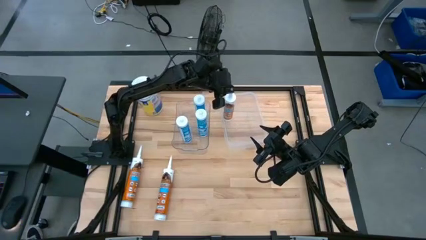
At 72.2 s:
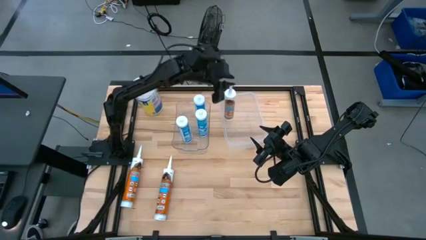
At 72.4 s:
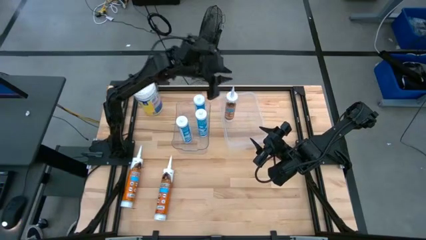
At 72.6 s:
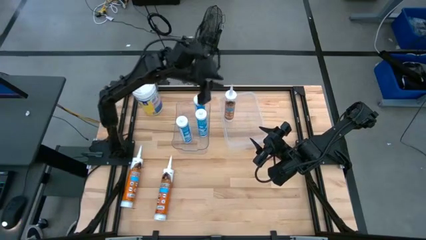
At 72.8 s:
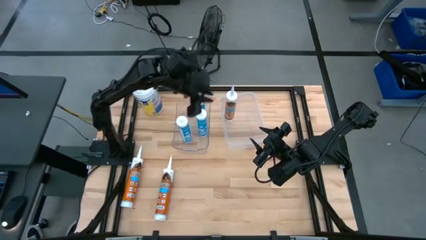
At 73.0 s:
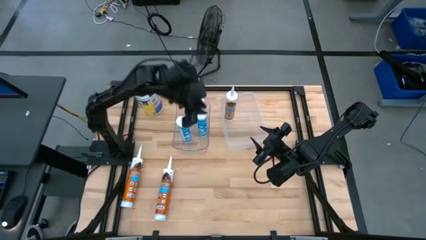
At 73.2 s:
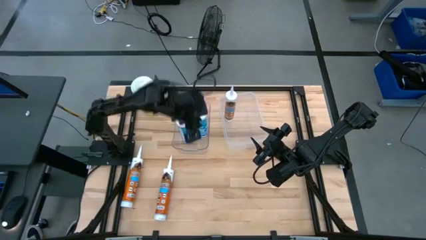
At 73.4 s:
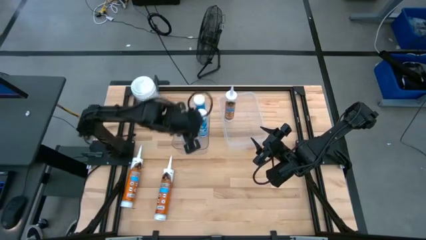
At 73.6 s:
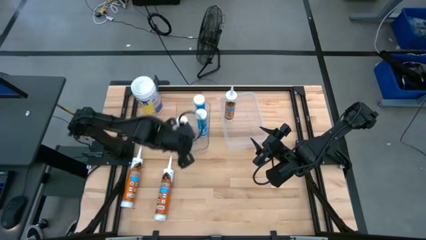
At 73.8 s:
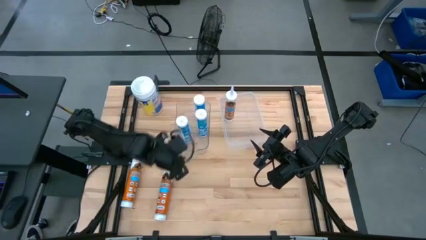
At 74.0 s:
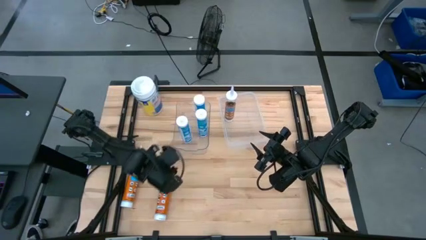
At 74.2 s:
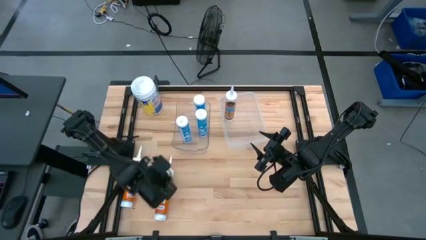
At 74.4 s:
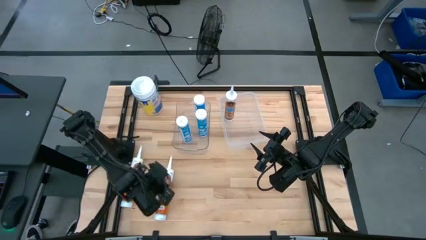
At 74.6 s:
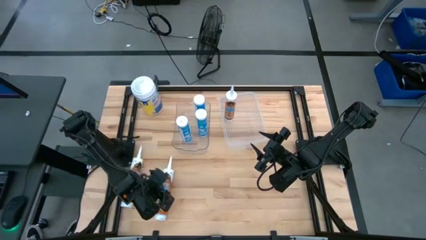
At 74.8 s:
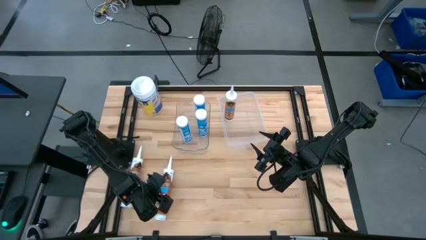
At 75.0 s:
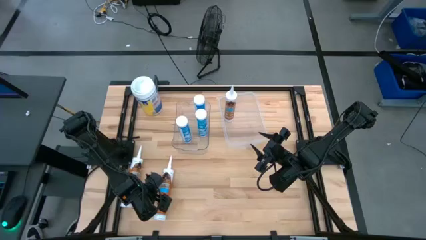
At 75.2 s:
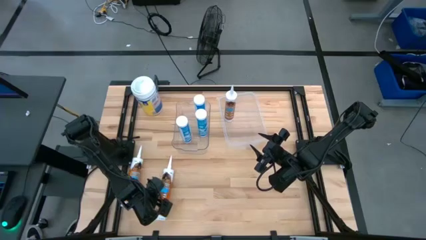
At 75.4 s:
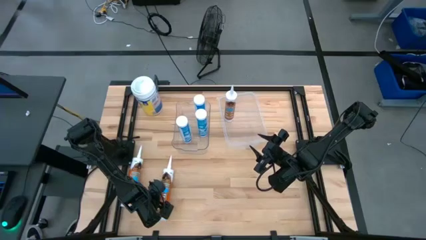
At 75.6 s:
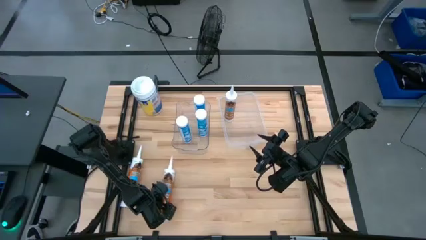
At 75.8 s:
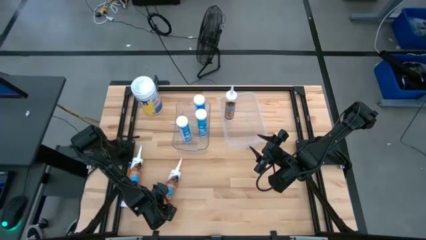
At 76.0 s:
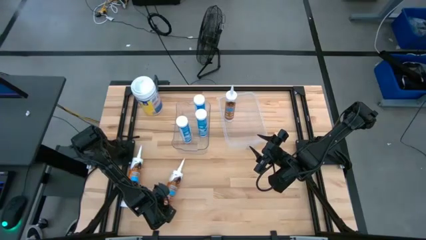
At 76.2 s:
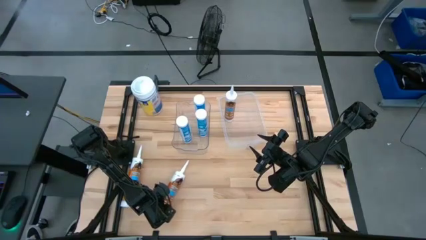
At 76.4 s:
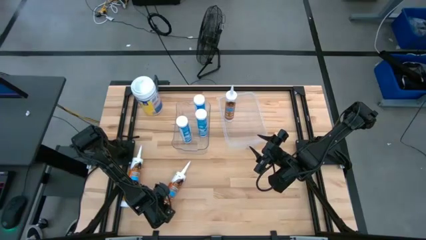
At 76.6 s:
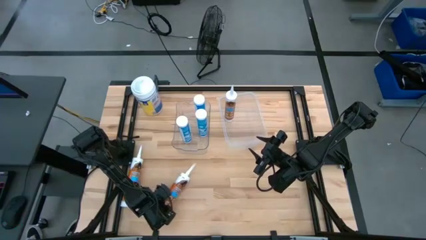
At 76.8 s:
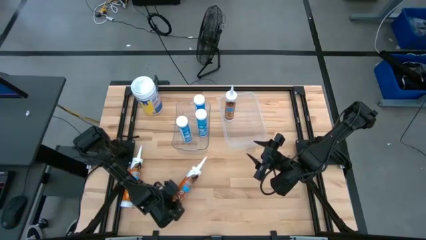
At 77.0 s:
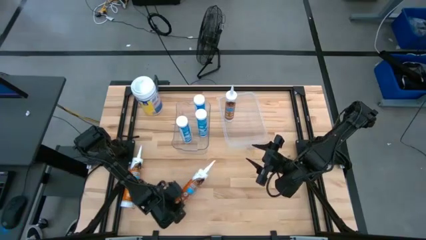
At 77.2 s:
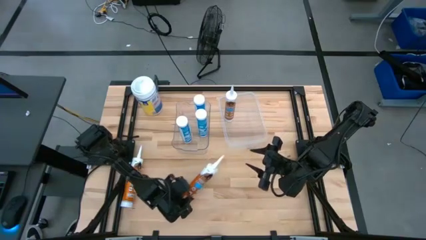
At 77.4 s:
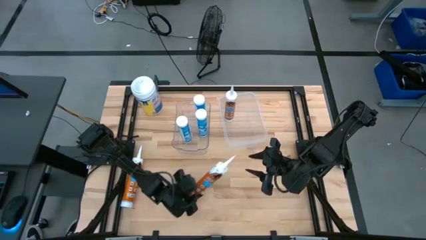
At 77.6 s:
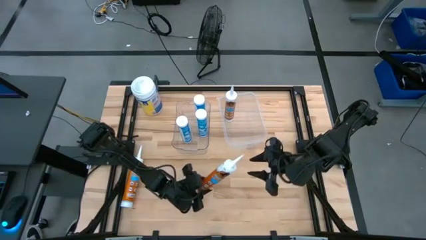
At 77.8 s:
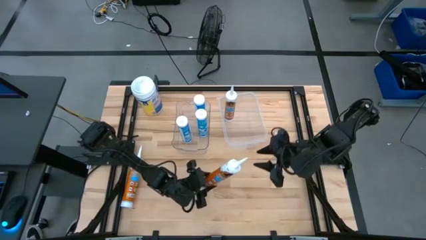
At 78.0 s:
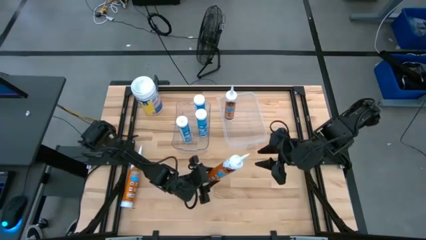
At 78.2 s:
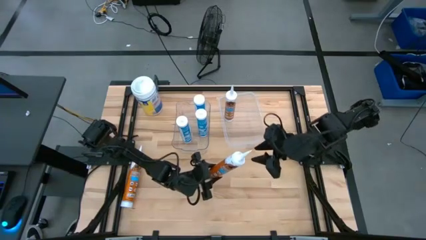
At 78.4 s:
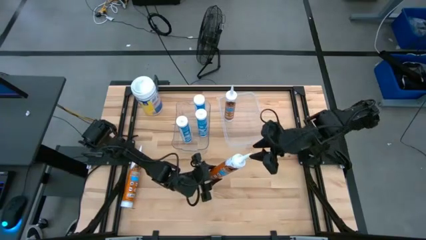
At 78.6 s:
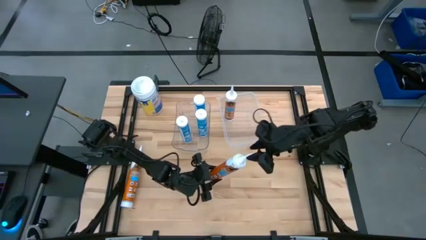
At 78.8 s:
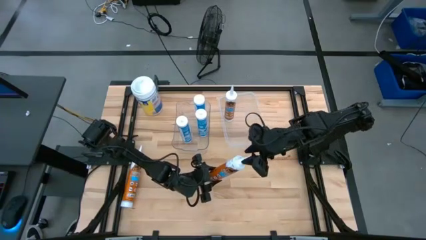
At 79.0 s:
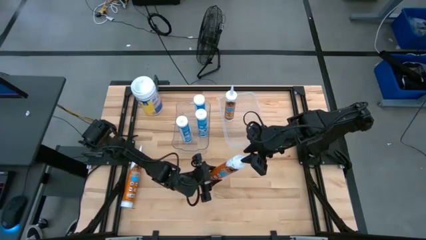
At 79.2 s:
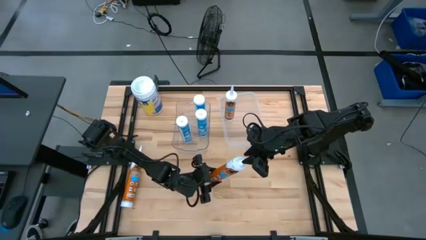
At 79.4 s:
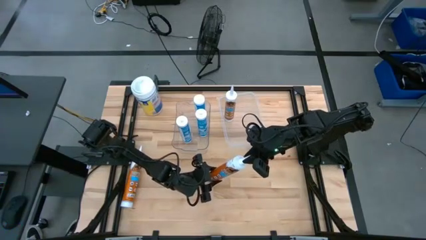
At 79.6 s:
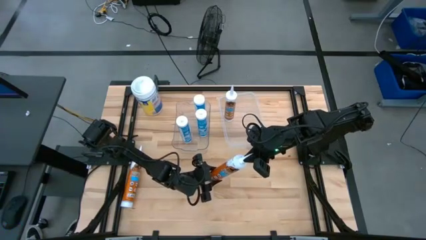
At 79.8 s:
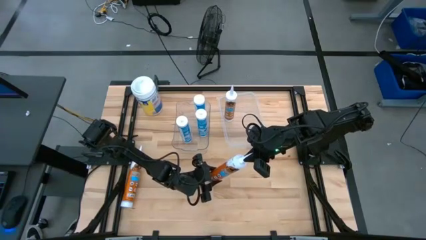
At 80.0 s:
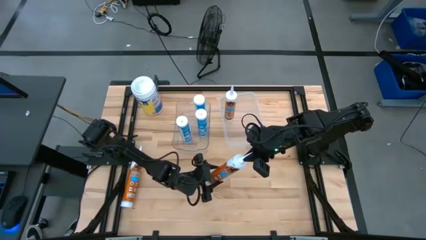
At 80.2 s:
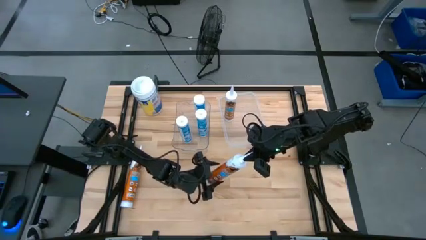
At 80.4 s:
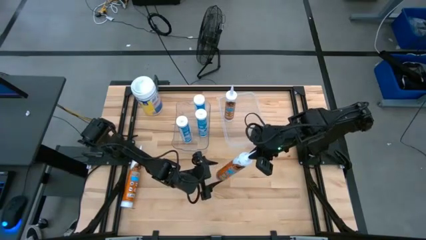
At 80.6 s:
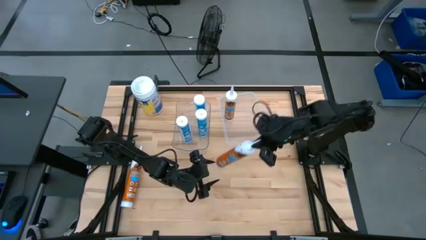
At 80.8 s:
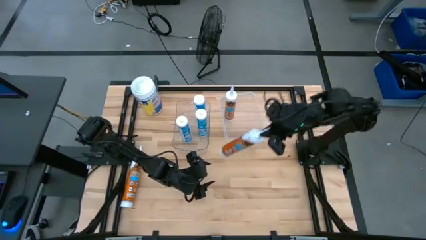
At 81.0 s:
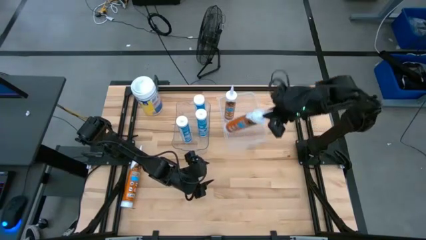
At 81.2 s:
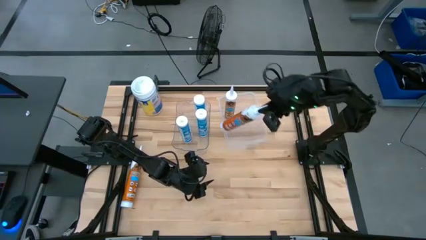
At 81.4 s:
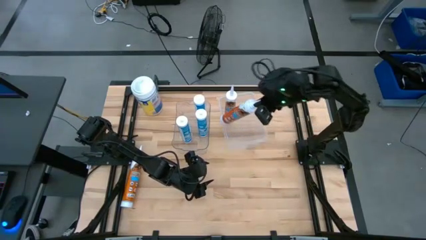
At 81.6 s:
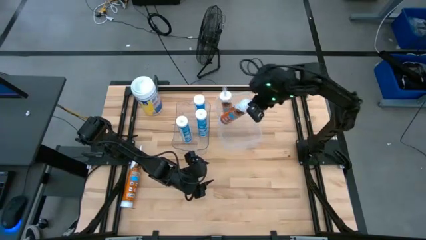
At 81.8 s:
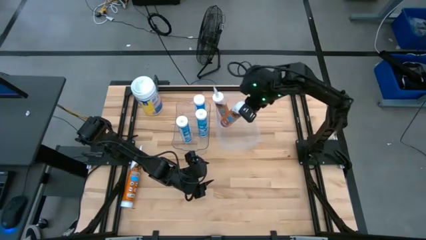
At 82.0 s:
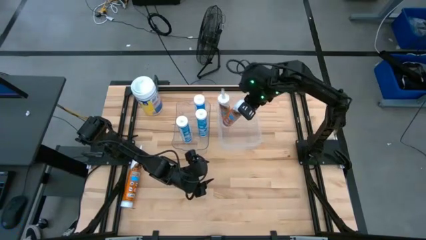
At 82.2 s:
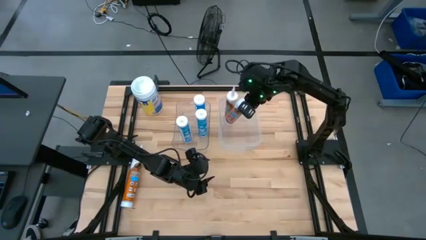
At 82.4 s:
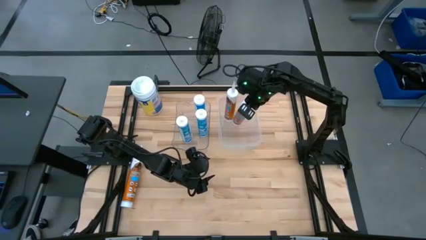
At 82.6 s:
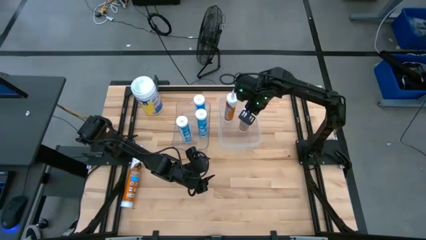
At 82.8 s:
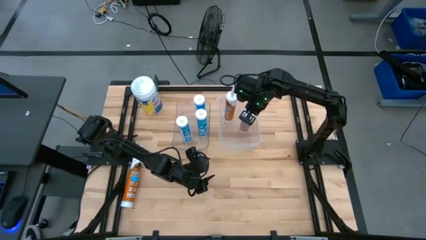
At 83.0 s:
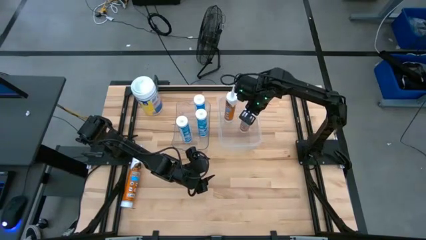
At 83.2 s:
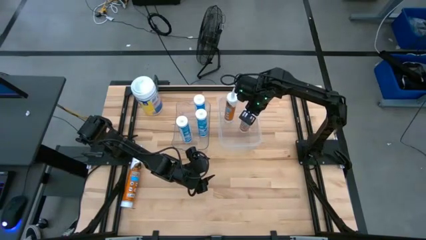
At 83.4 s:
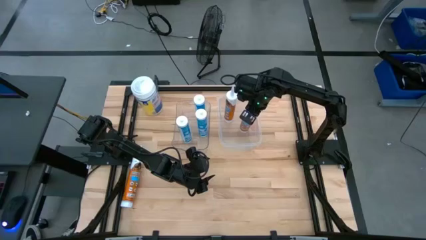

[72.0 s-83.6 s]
Task: Pick & place silicon tubes, Sealant and Lysol wipes
Put the right orange sealant into the right transparent bin

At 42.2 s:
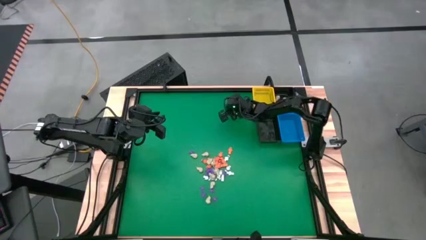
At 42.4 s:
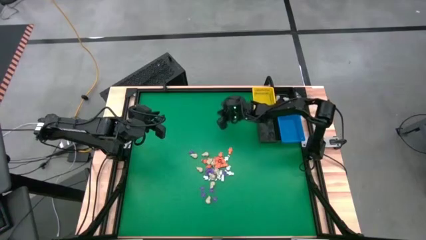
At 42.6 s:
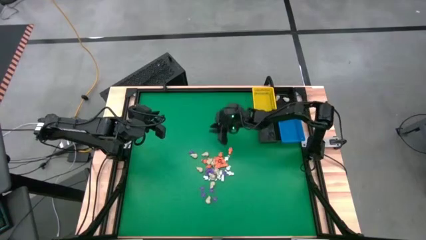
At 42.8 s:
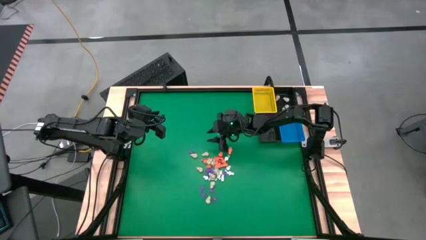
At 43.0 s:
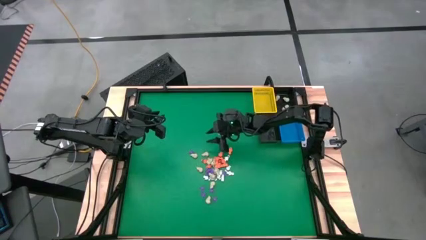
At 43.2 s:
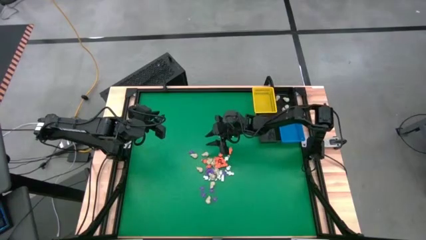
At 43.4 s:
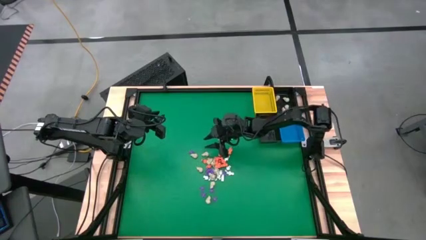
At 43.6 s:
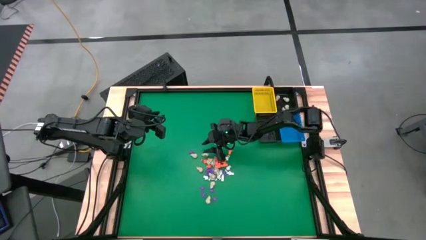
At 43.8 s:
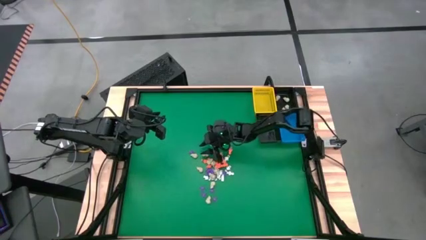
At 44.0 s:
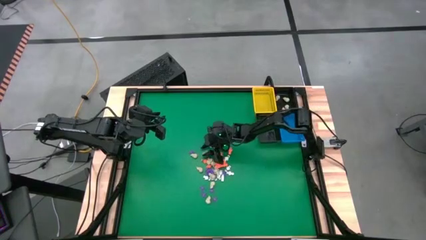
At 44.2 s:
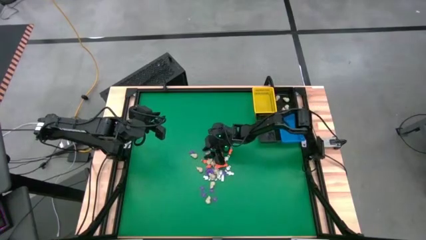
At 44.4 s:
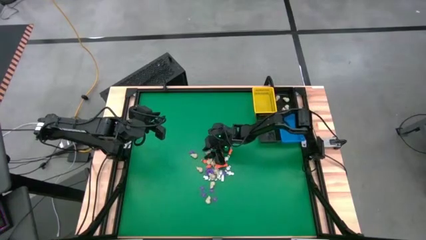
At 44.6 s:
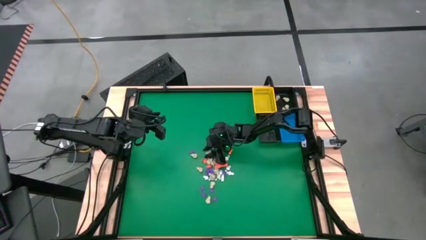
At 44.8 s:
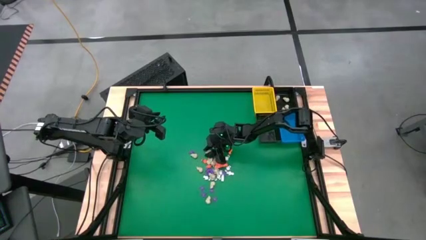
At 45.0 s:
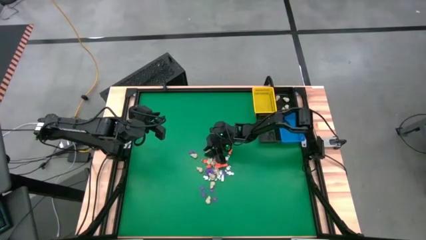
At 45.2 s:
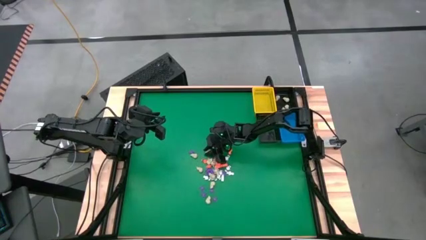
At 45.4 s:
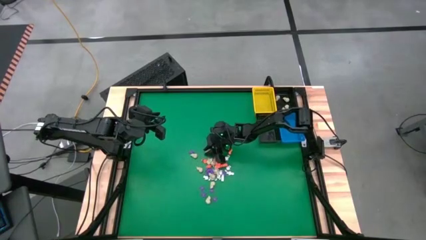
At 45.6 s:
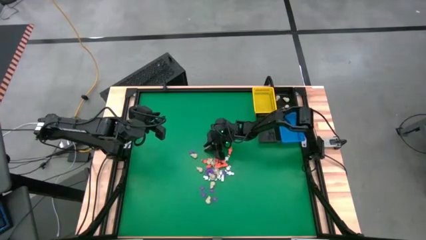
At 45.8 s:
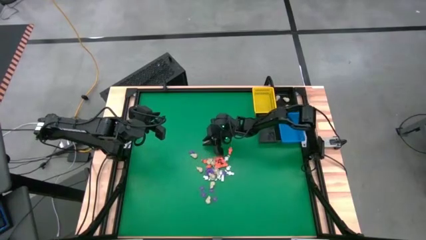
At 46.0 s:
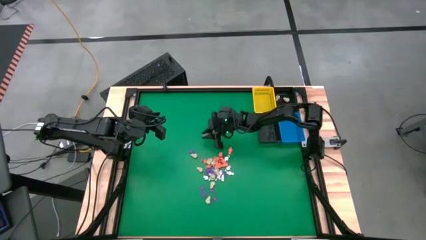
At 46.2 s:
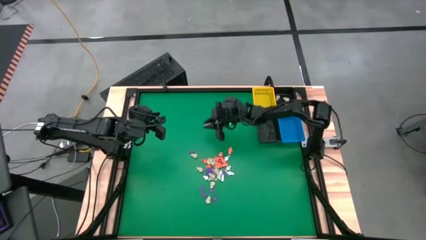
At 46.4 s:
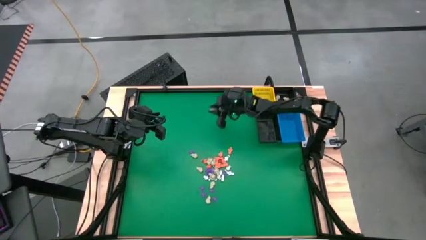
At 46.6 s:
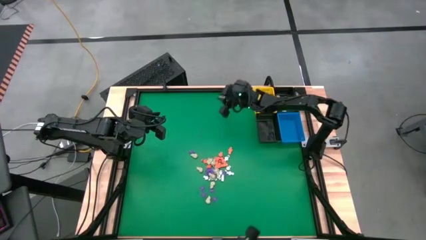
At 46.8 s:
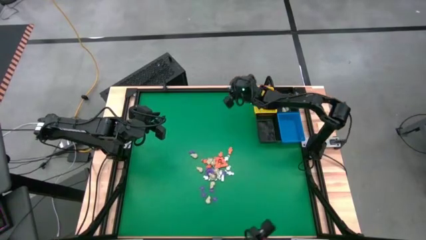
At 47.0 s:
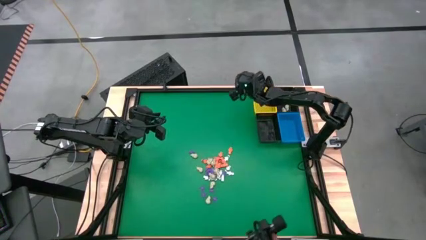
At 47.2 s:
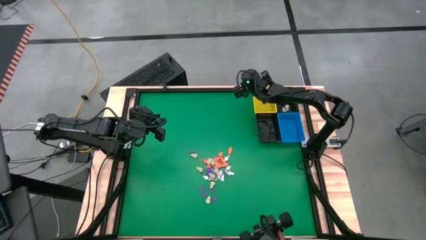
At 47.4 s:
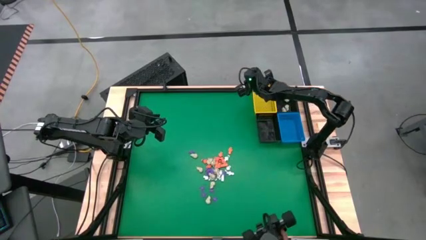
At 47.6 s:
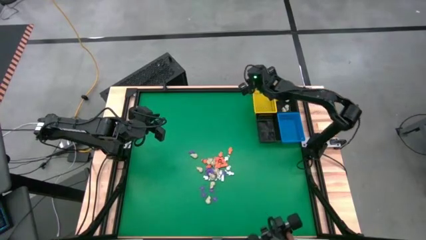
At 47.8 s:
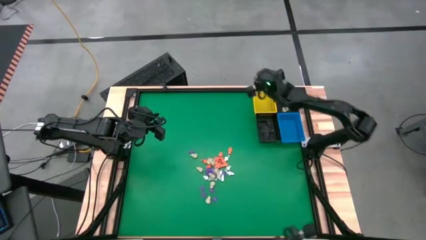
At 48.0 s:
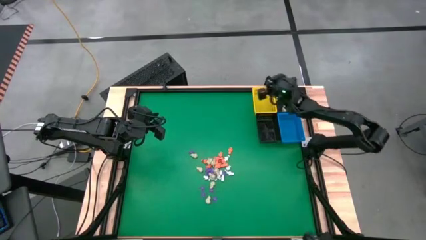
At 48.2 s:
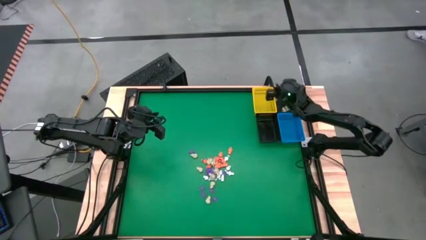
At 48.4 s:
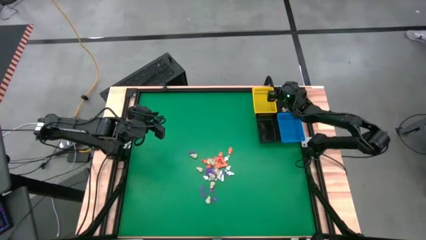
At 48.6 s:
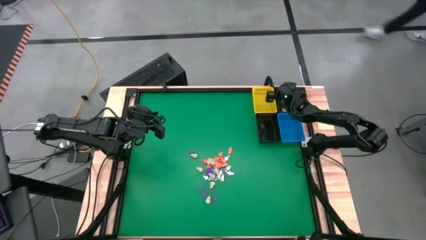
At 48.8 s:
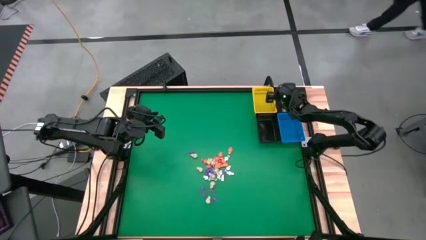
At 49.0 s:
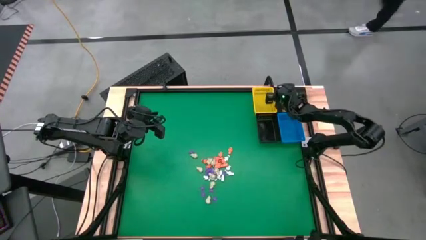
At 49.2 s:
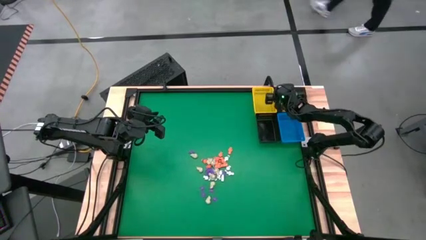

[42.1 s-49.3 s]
Task: Sort Halloween decoration
Put the gray skull toy into the top black basket
